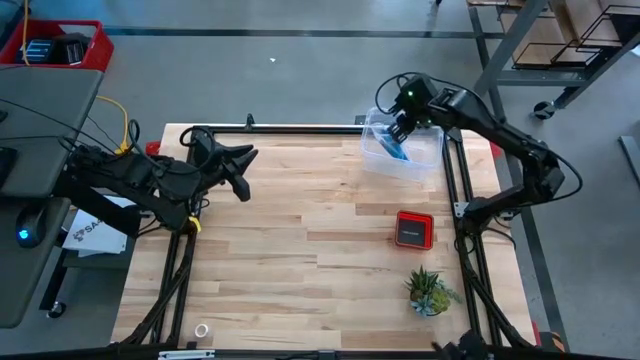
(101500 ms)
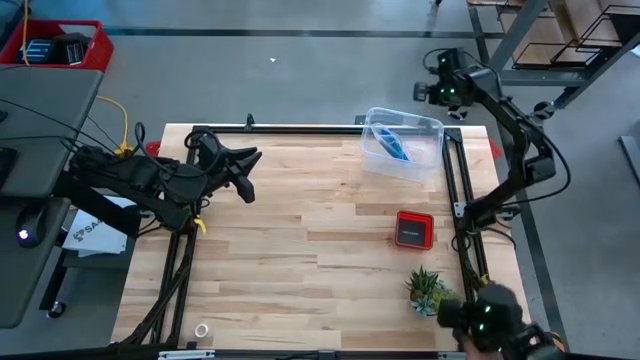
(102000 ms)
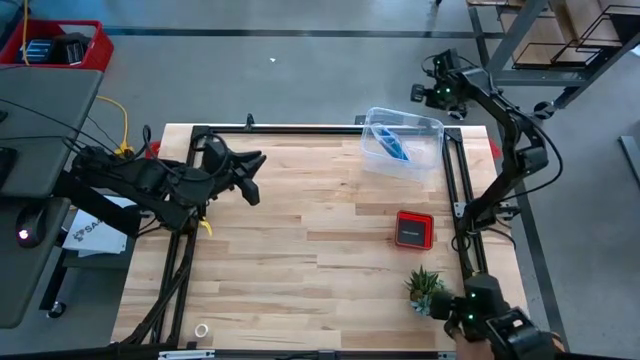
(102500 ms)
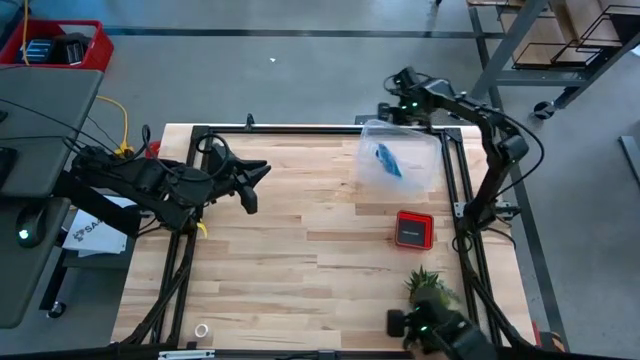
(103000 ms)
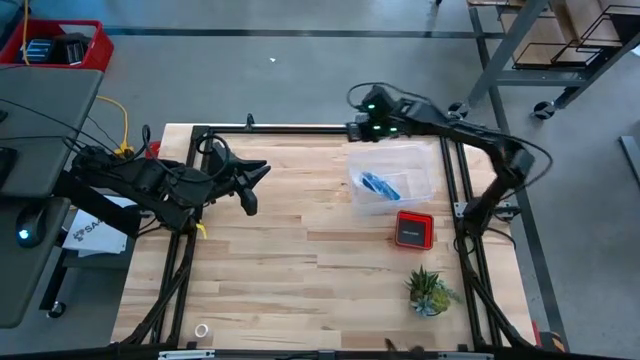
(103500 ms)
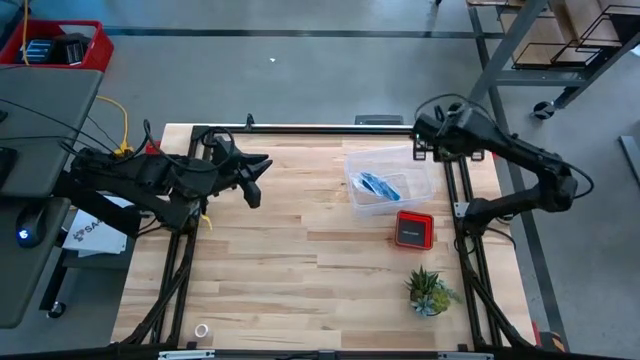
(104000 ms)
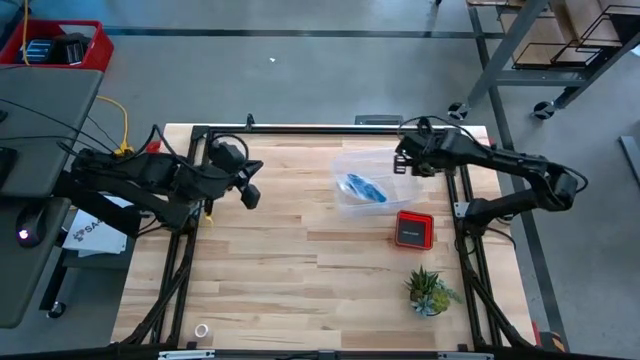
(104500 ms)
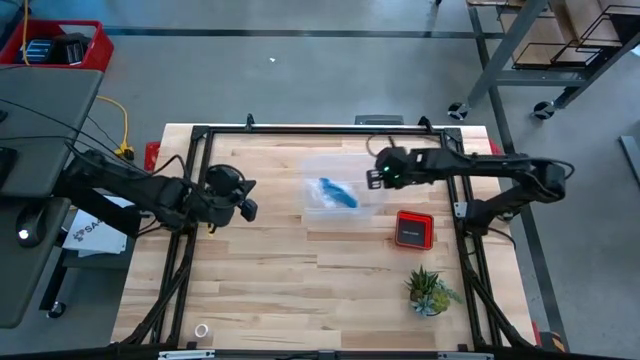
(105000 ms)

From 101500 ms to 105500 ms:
Task: Roll bandage
Move the transparent container to the center of the table

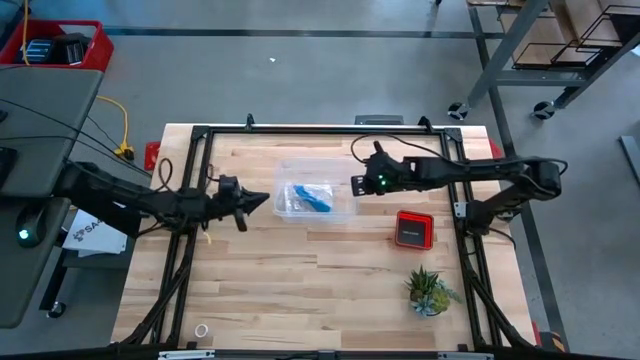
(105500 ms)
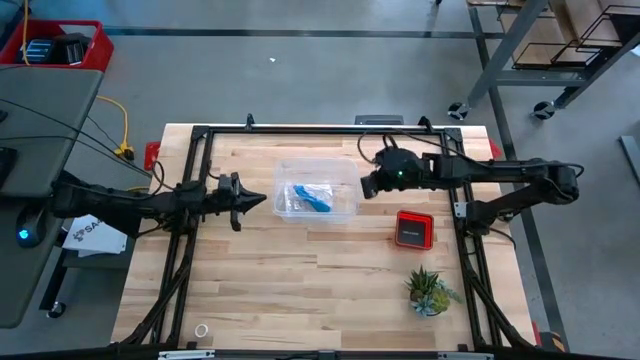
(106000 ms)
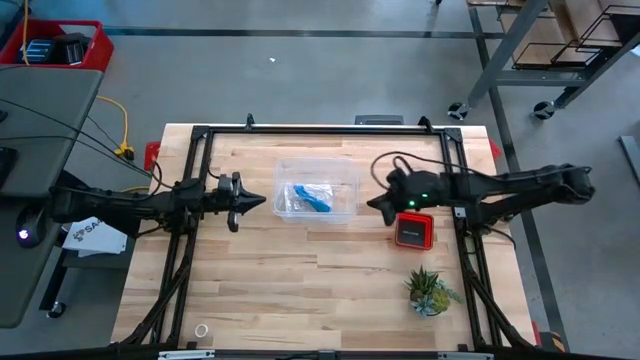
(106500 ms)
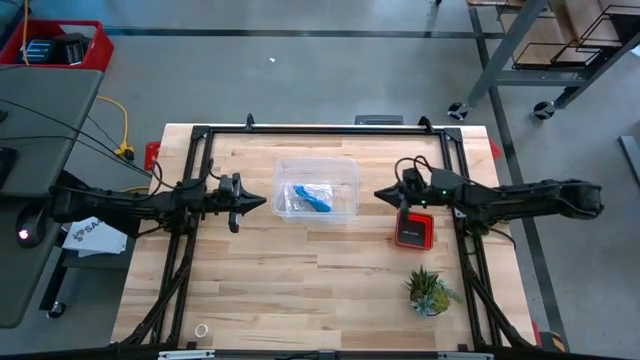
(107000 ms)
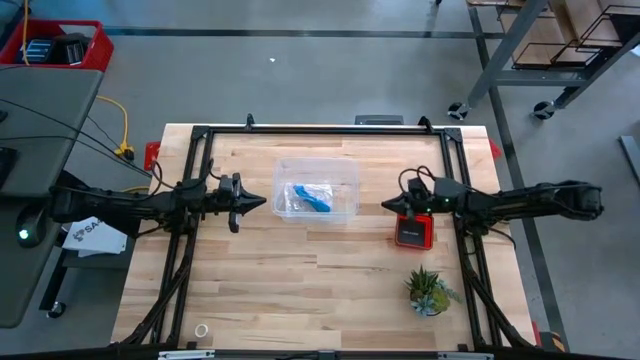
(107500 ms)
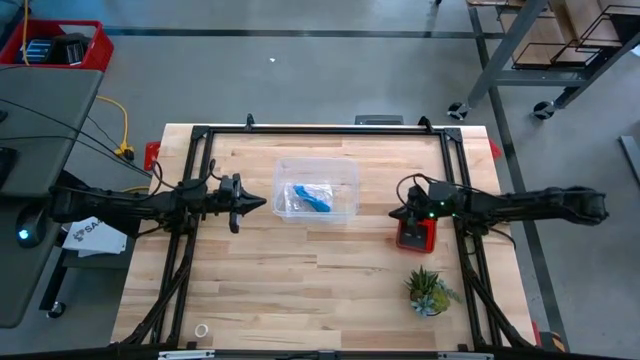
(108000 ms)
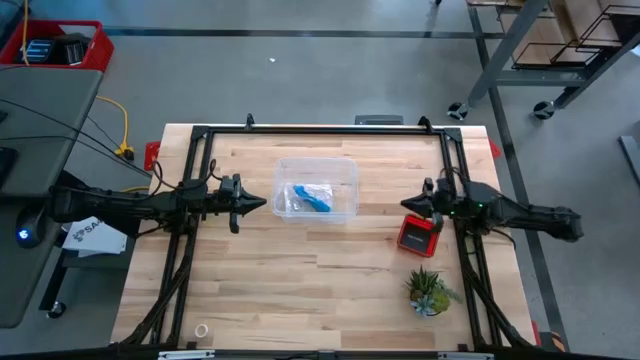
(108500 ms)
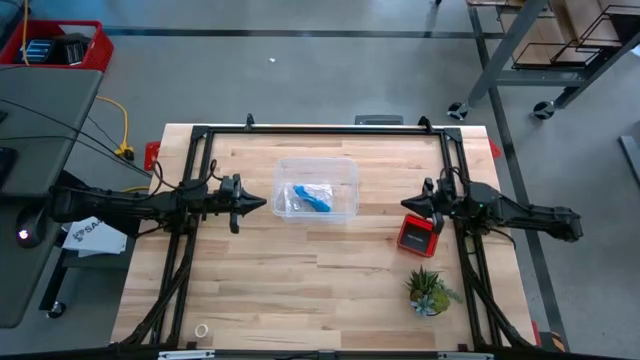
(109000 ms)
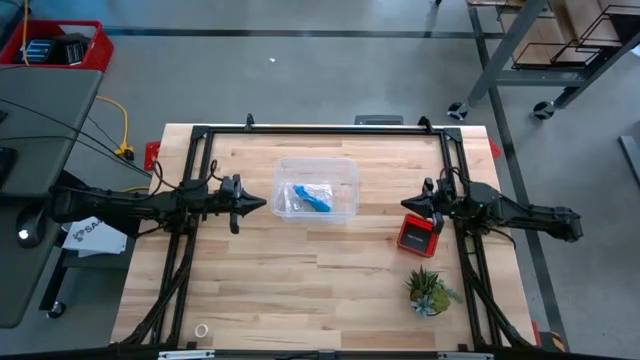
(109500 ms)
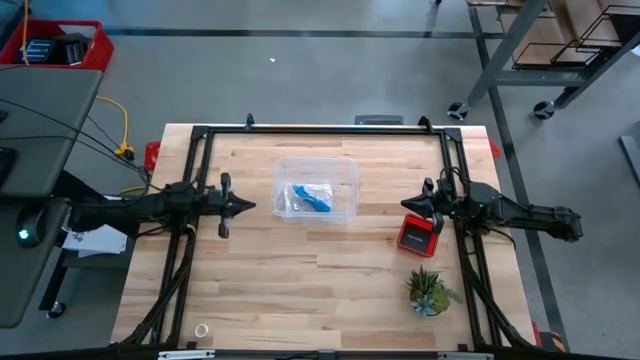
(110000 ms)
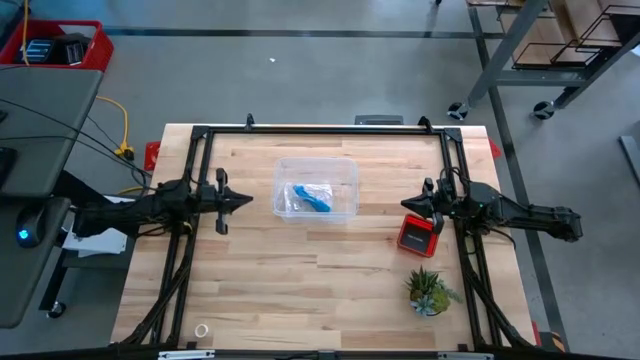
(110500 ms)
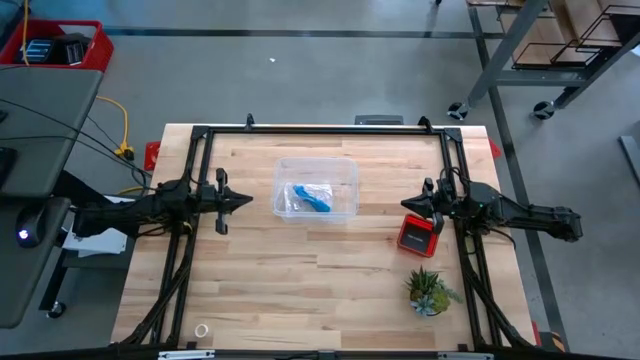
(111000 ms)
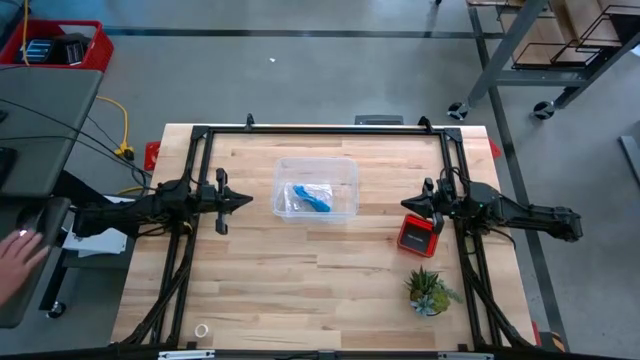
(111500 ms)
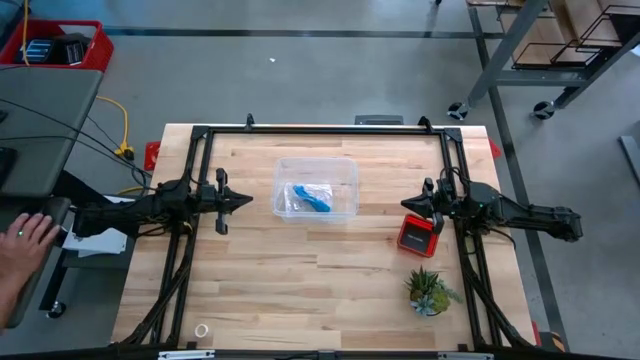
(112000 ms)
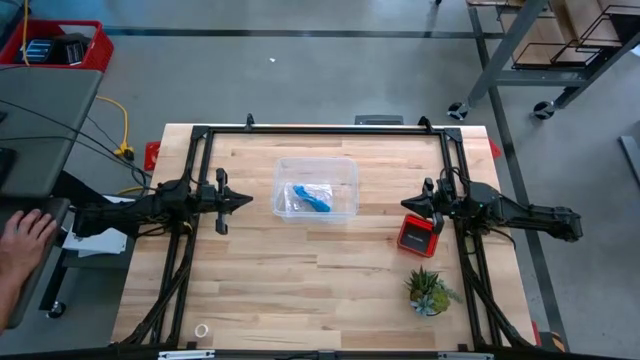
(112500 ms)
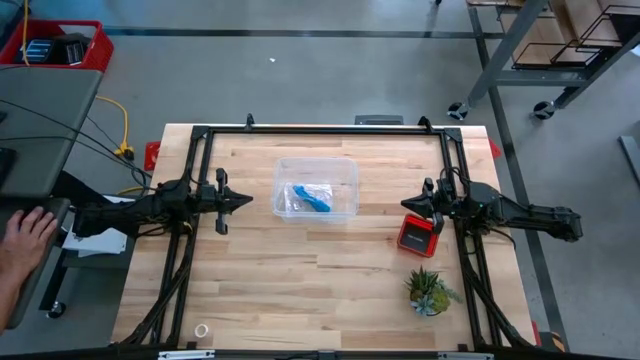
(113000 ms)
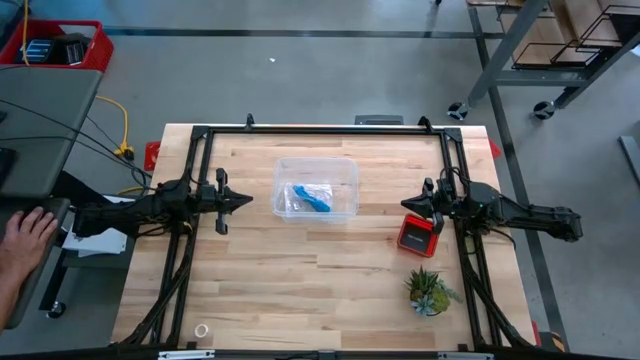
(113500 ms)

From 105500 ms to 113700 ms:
Return to Home Position

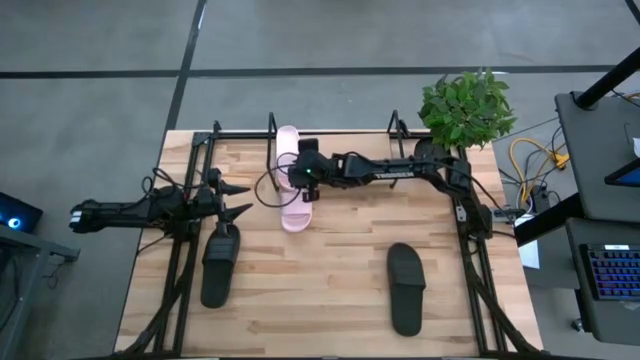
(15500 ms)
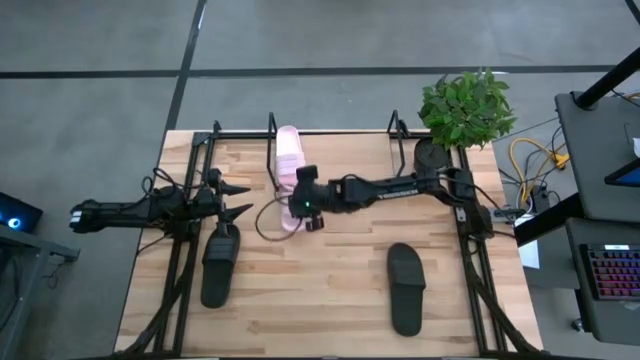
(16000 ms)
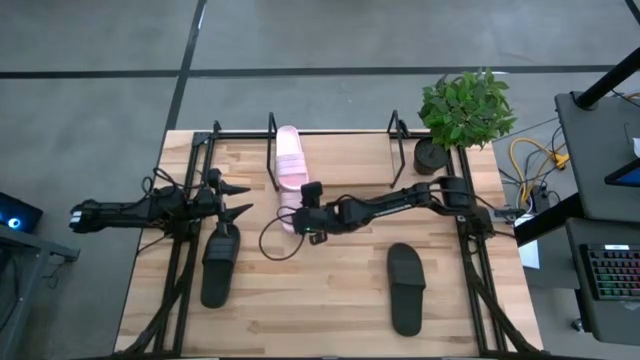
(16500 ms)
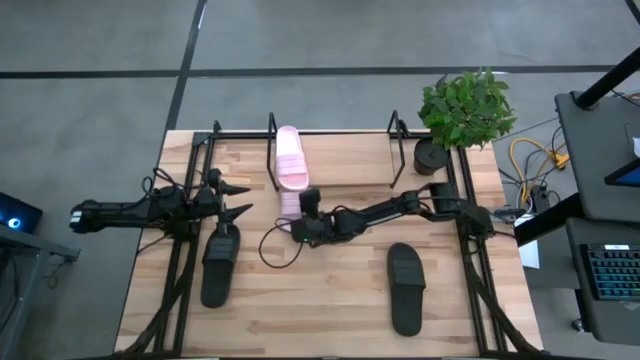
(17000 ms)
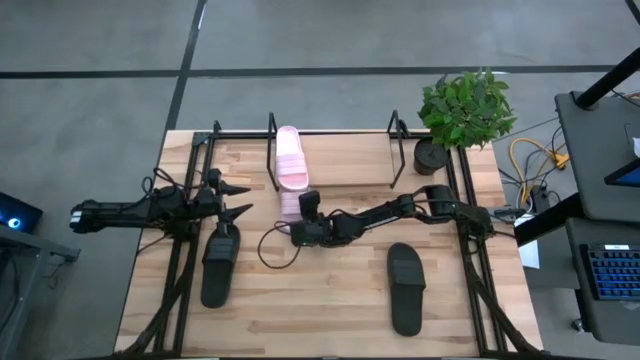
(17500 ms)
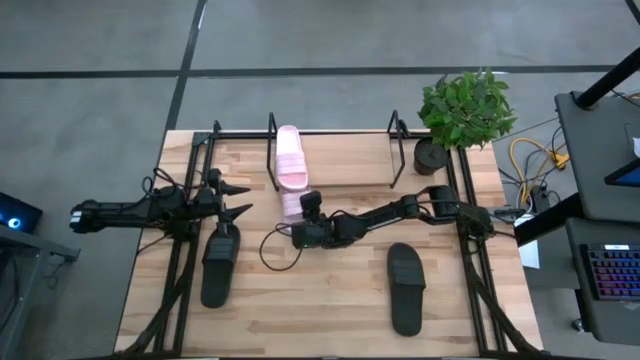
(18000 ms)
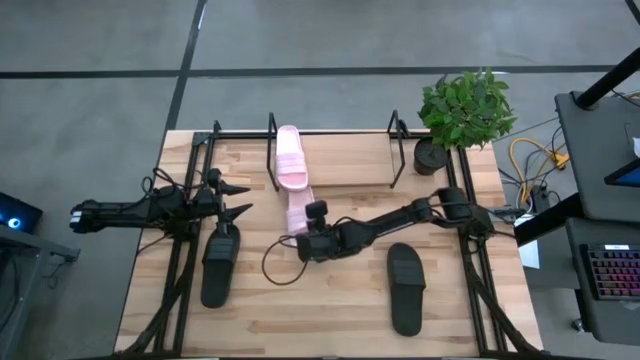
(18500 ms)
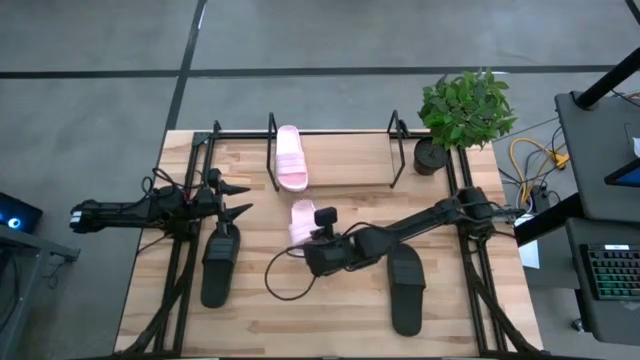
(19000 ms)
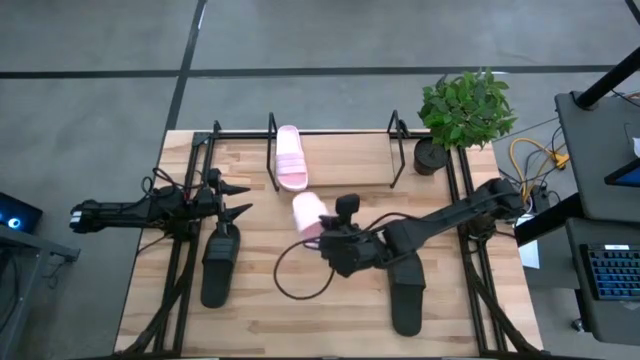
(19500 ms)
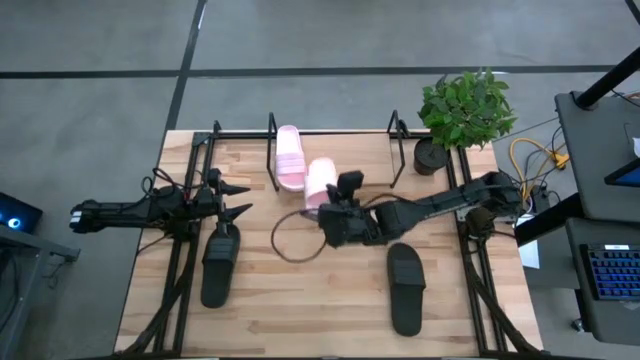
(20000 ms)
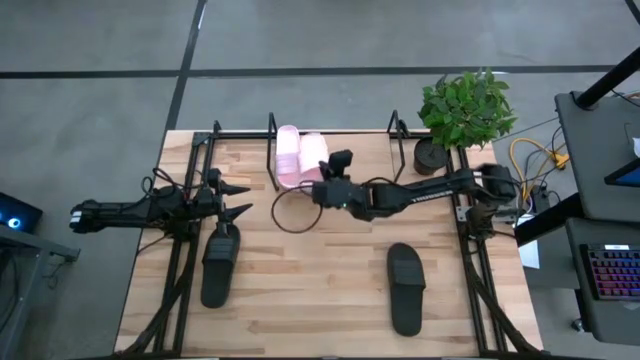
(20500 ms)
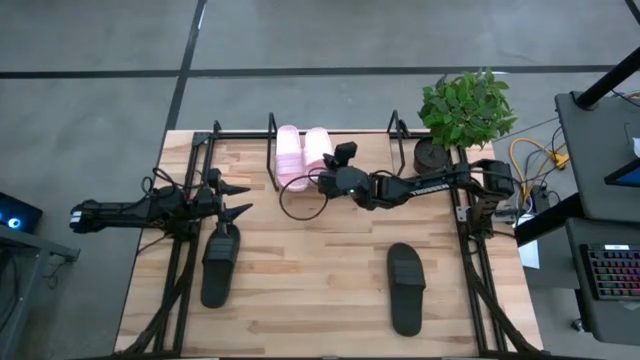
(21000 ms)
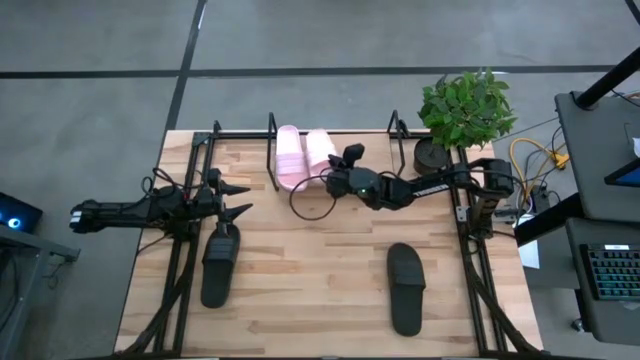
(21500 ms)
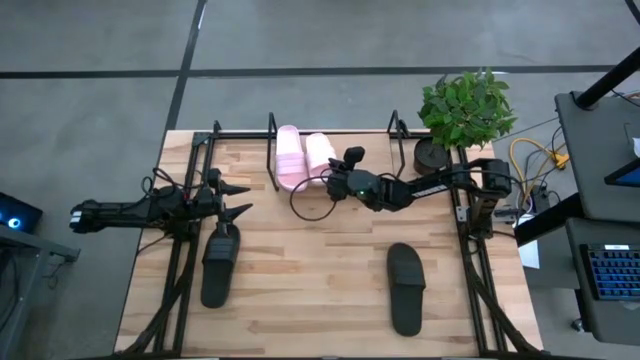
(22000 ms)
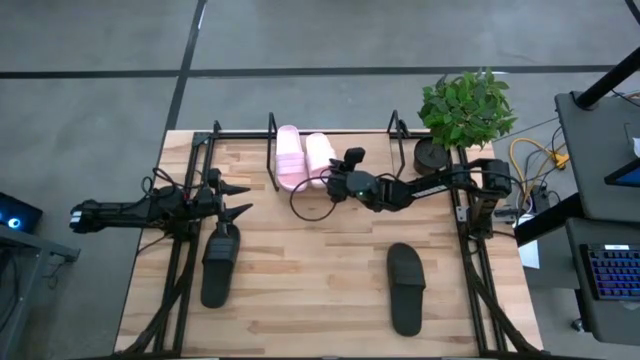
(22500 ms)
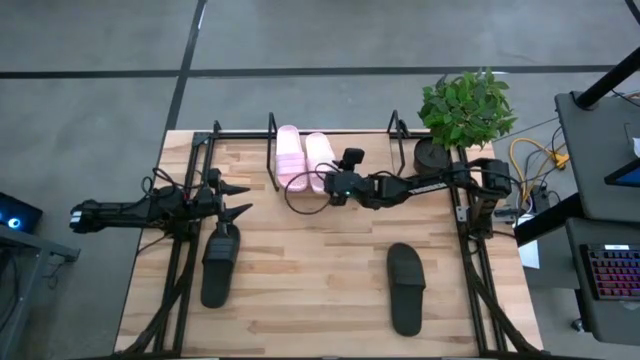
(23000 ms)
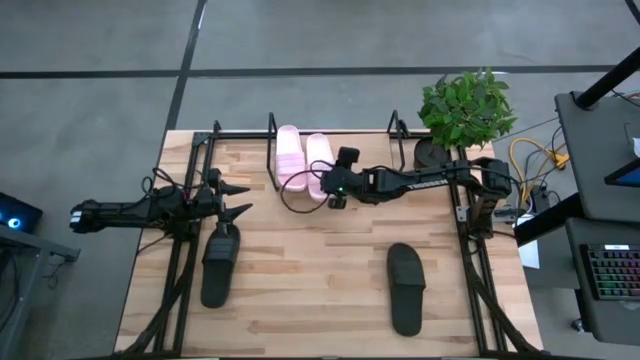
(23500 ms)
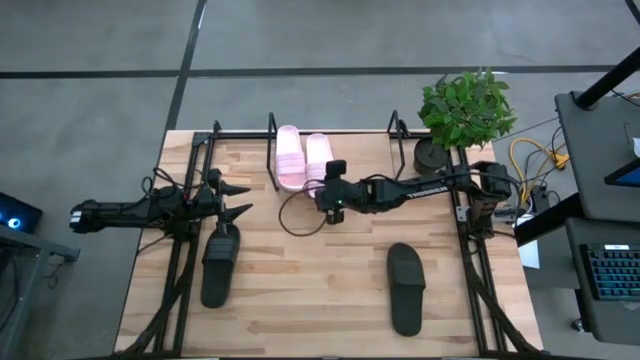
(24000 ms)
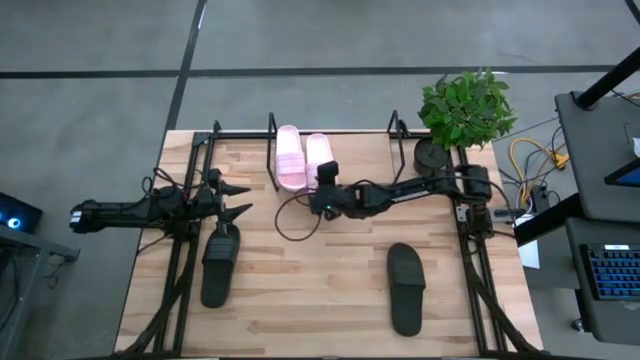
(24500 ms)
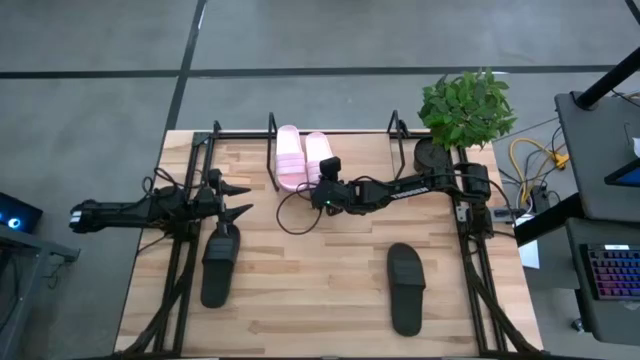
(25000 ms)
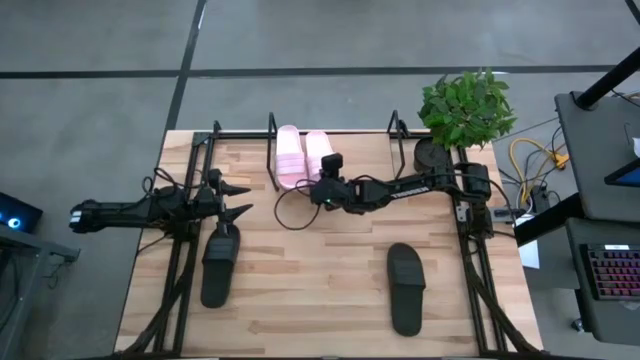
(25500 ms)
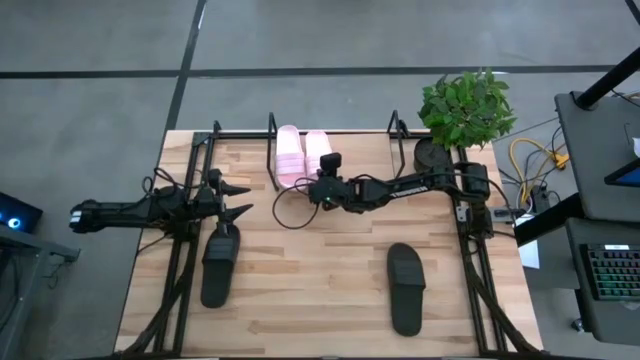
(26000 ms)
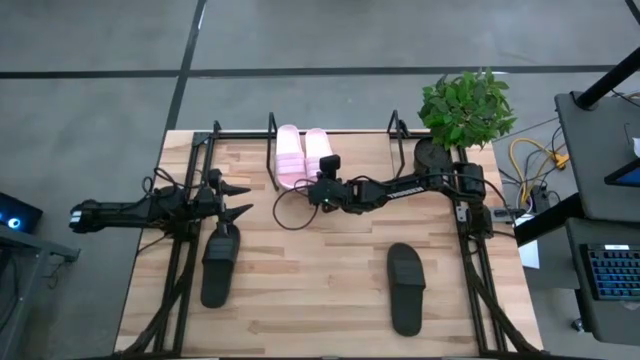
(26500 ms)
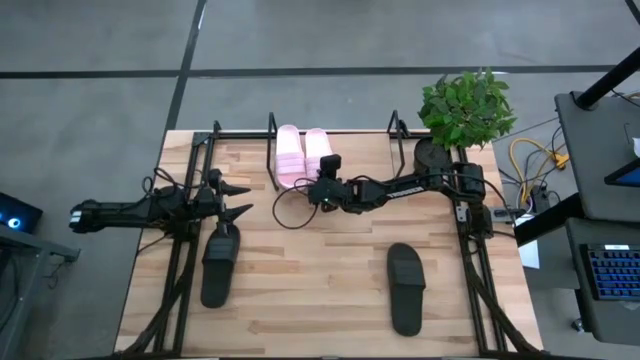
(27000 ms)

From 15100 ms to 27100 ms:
Task: Pick and place slides into the shelf
Put the pink slides on the shelf
